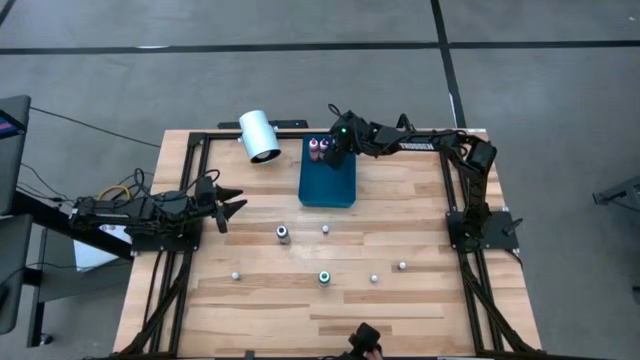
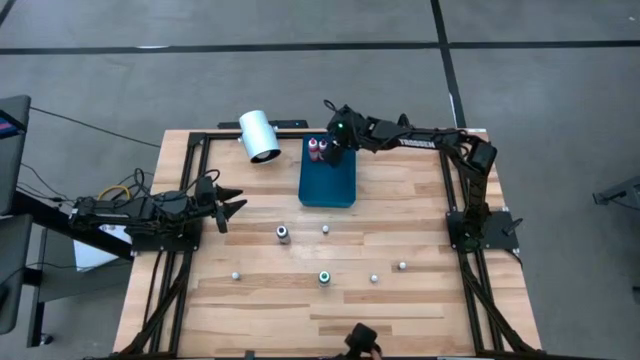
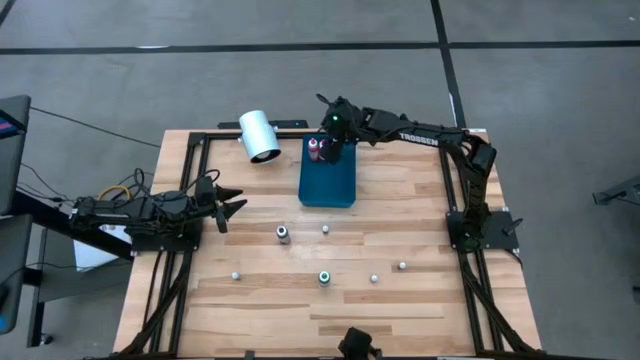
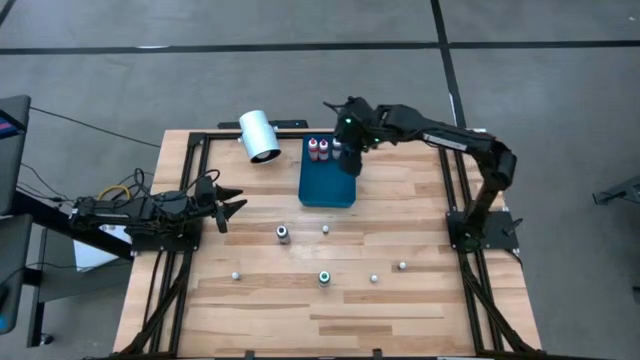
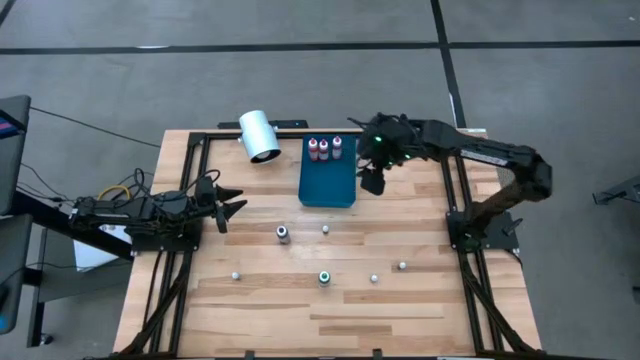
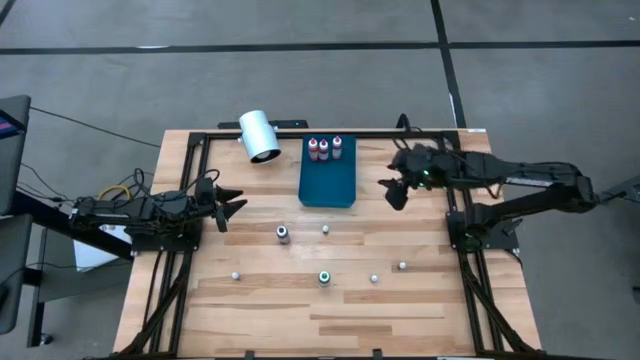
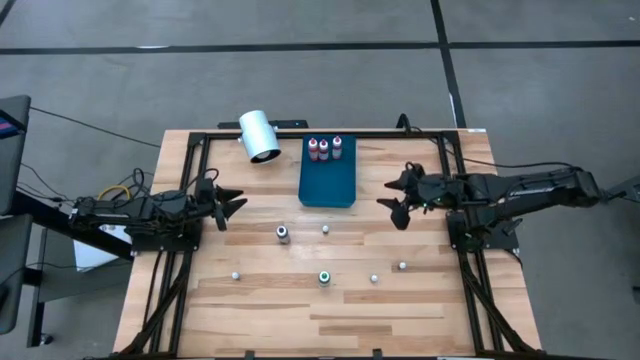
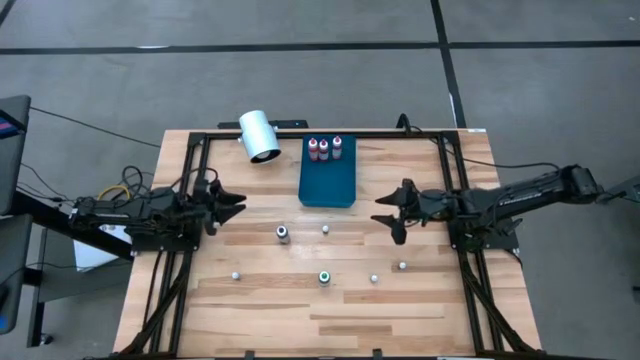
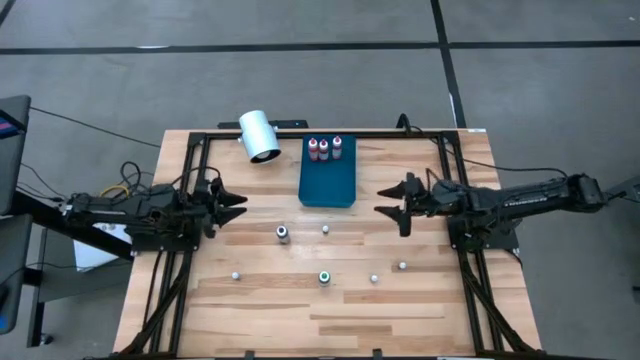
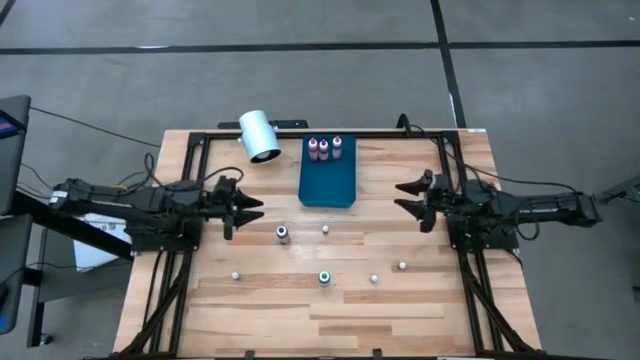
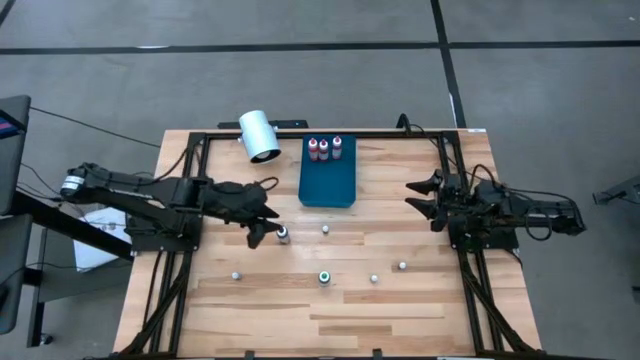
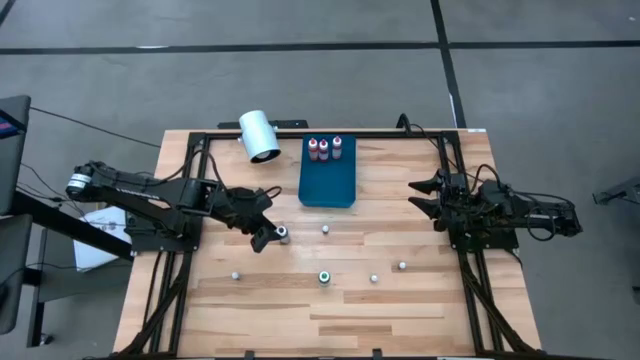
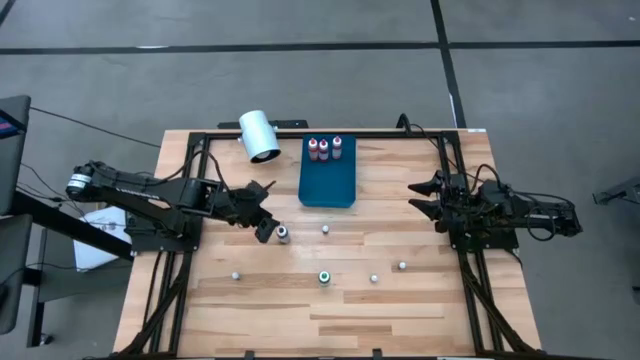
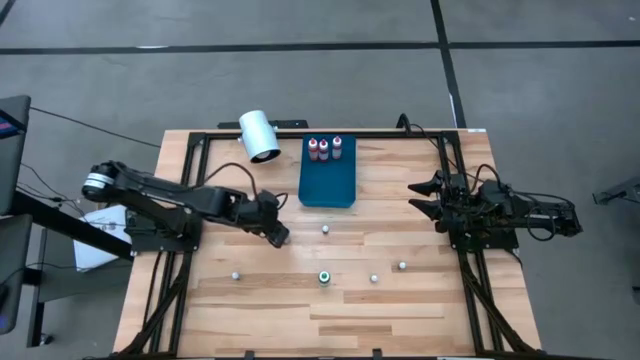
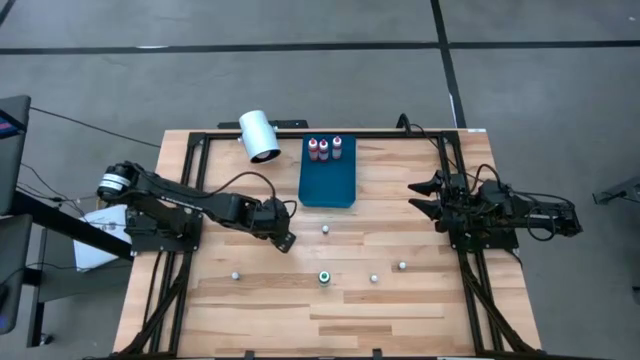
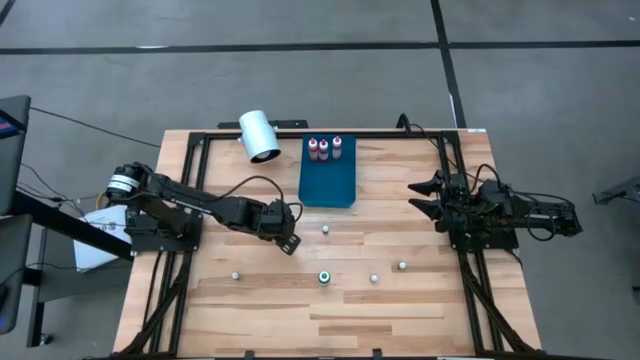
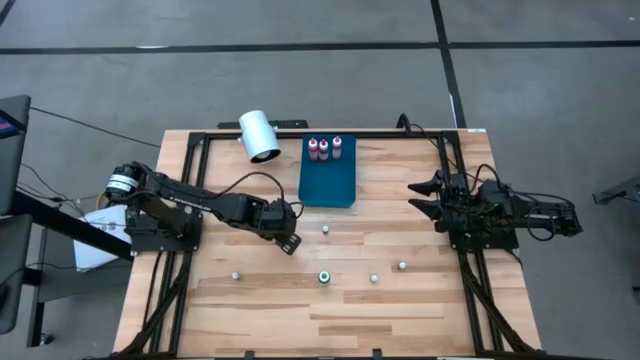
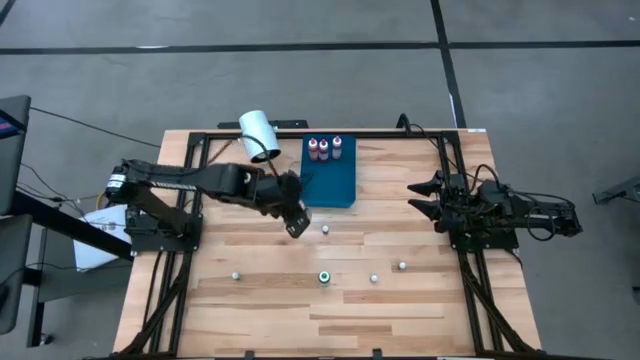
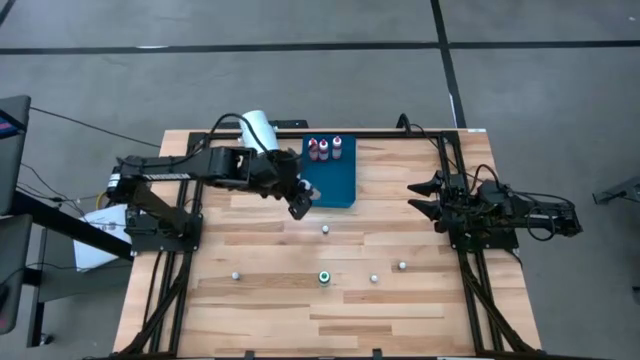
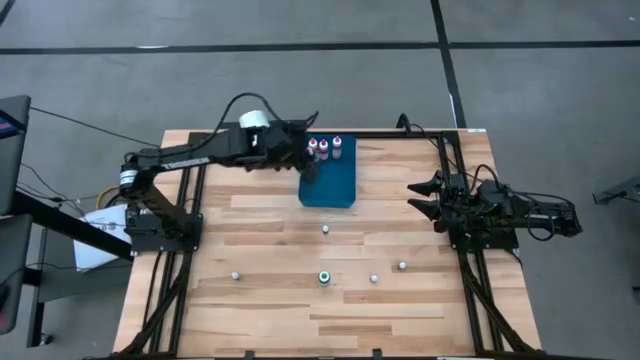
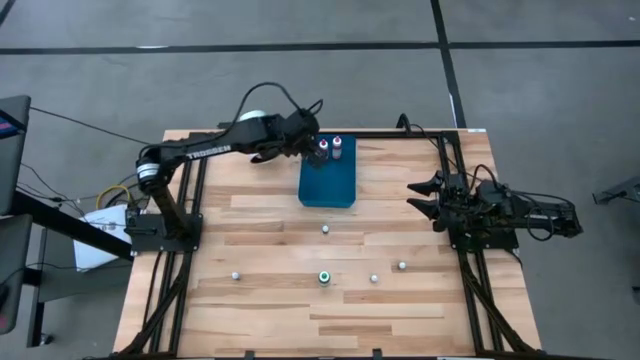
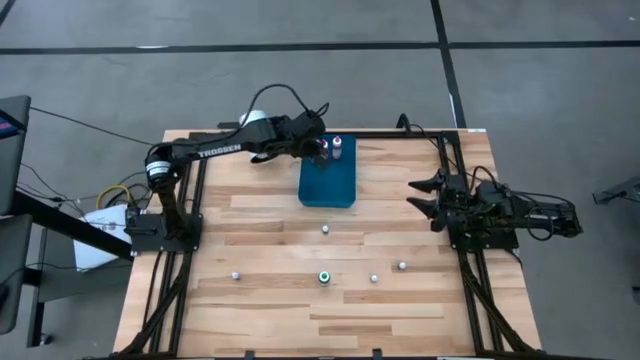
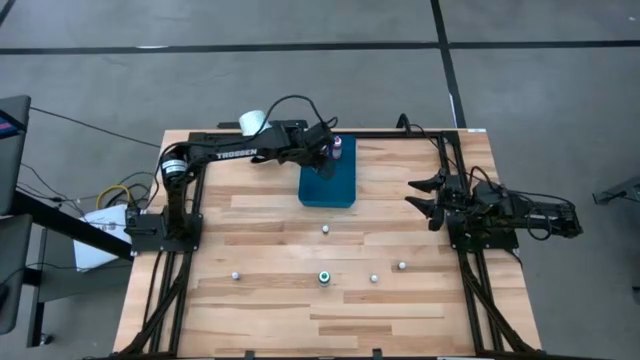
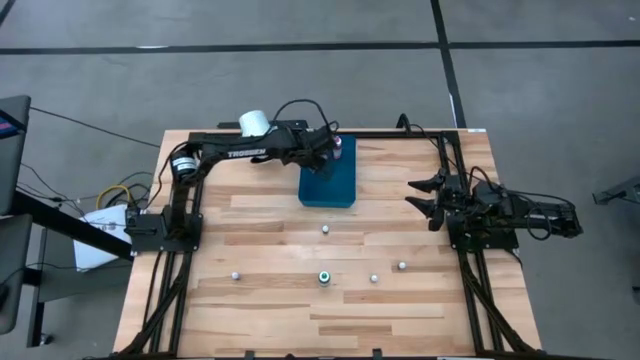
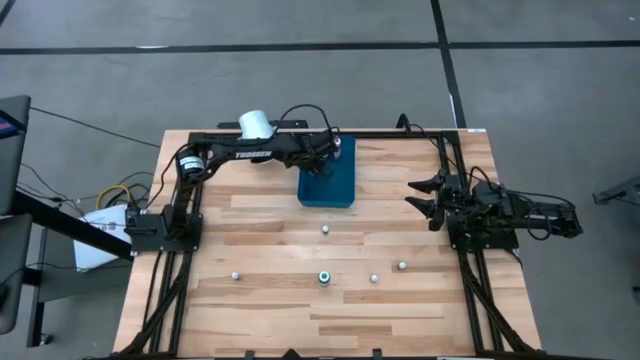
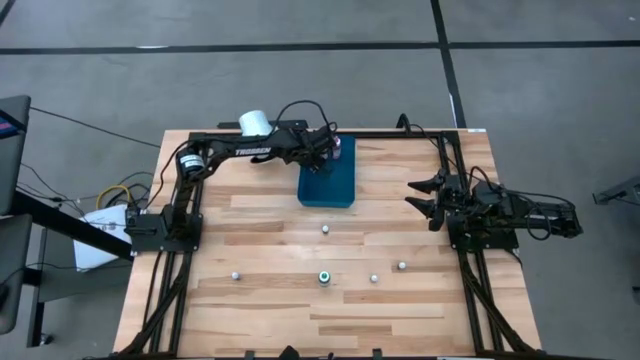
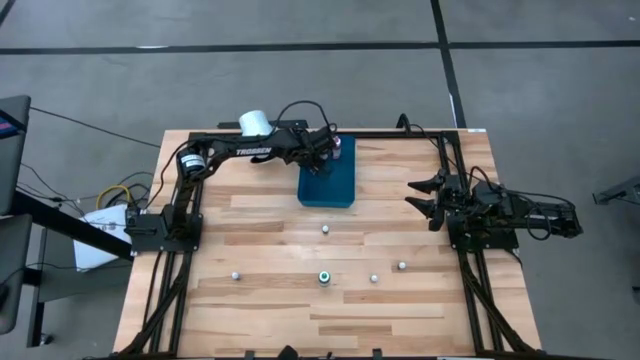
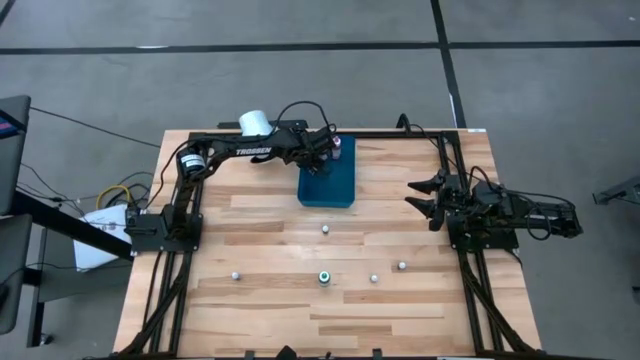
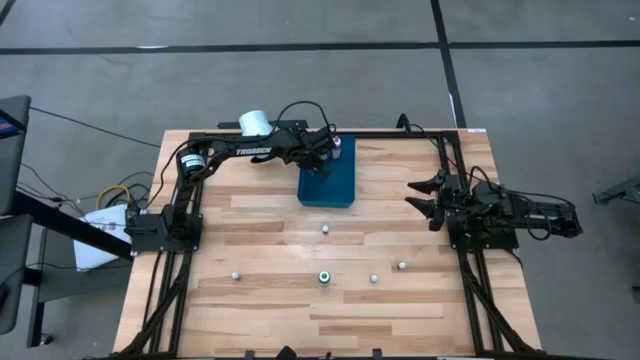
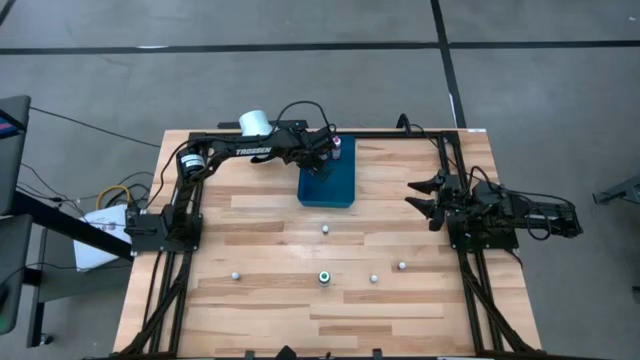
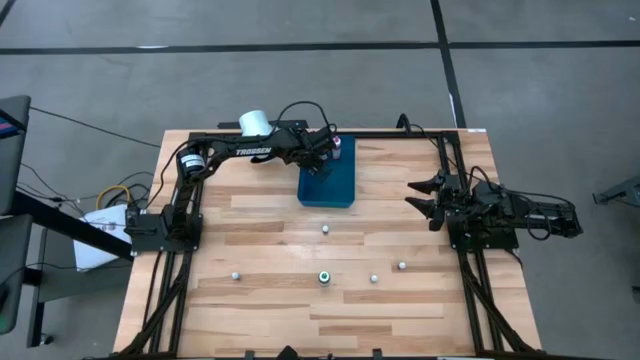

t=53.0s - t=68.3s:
Task: Pick & Place food coloring
Put the big black food coloring bottle into the blue bin

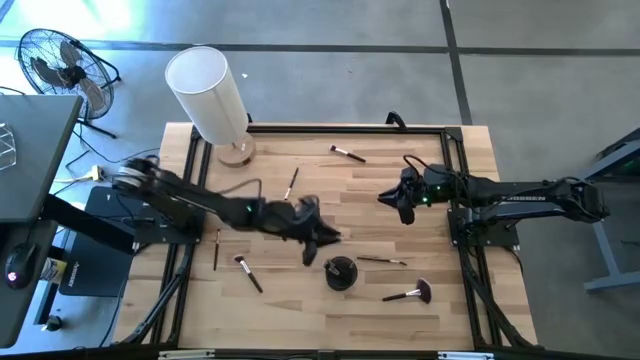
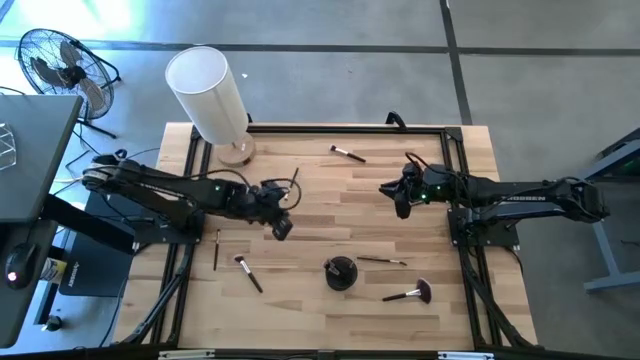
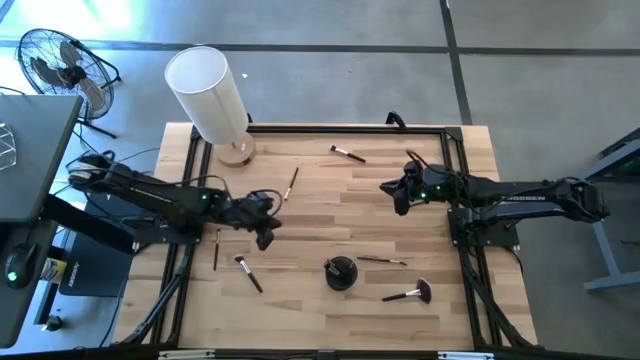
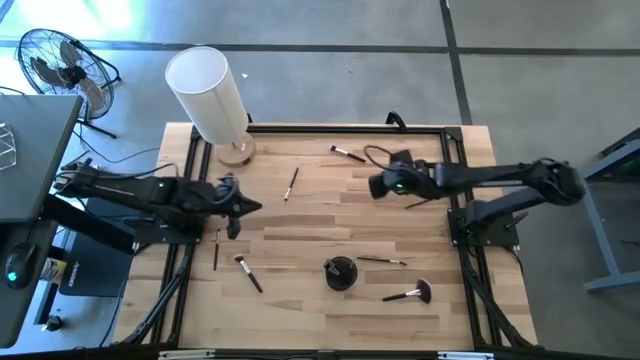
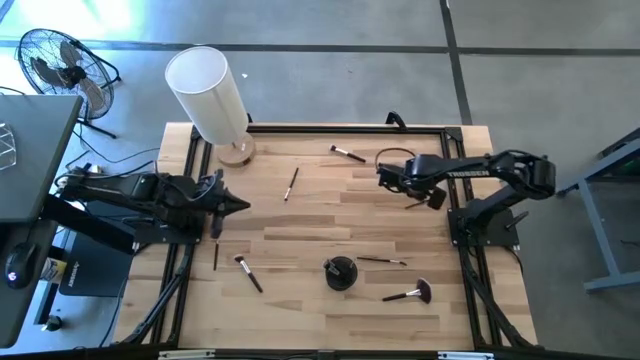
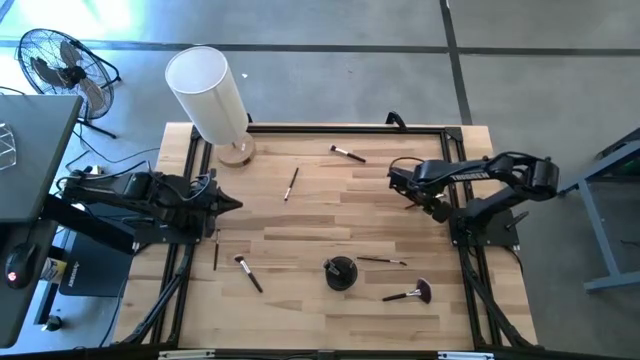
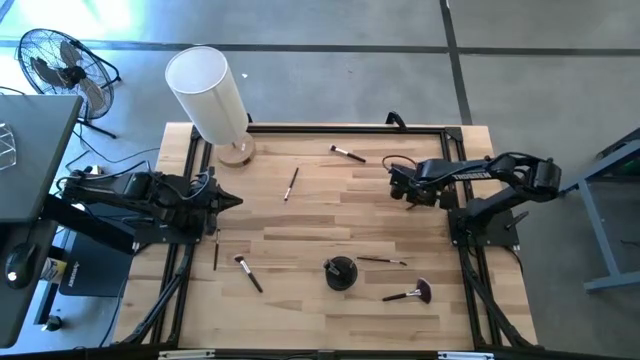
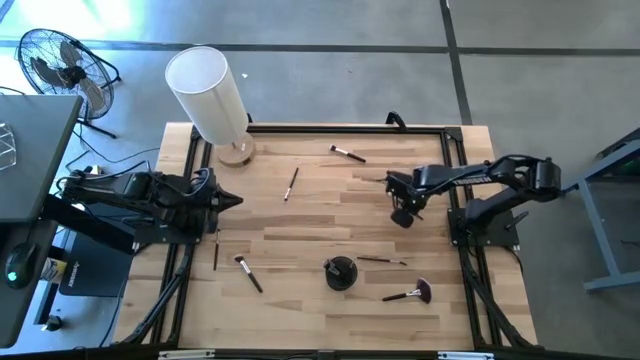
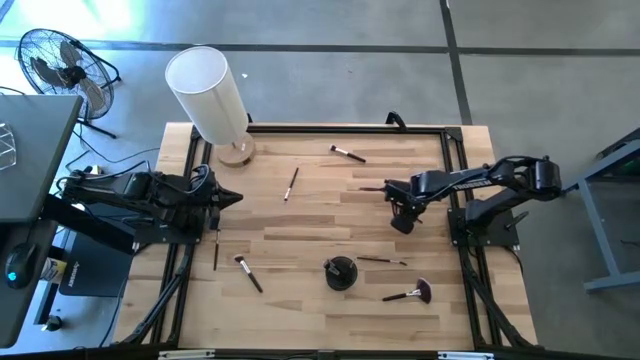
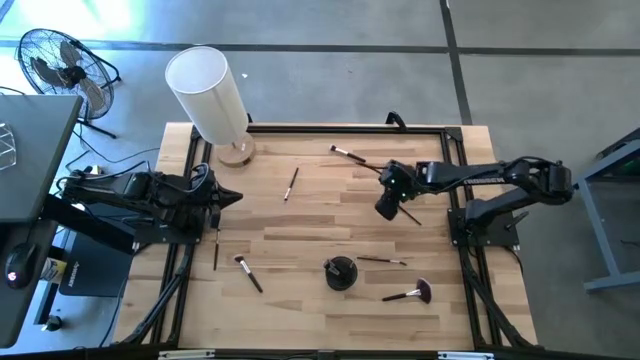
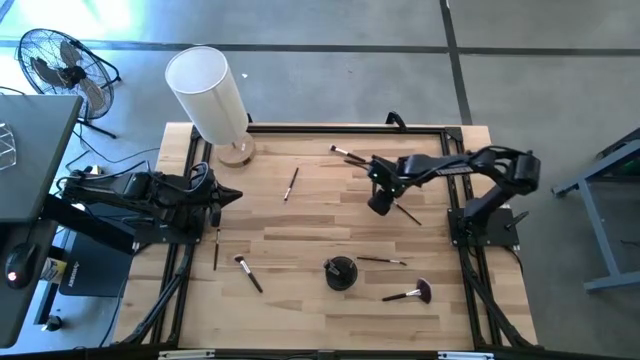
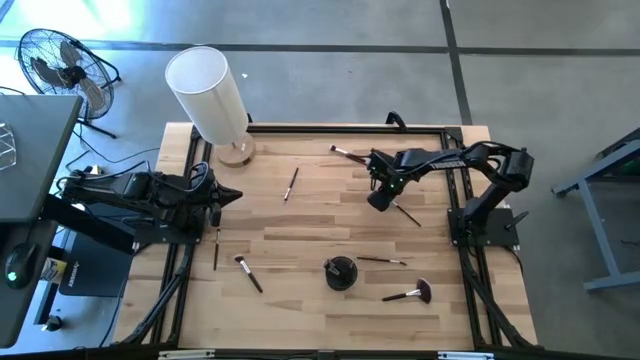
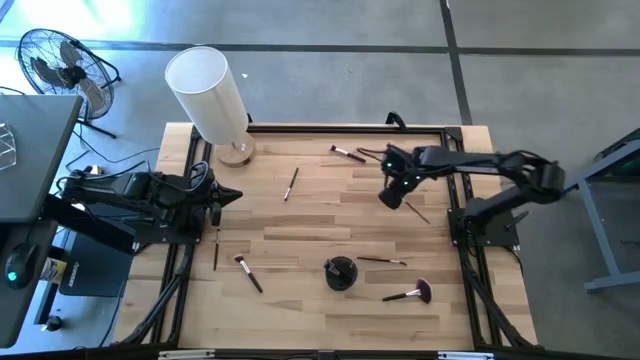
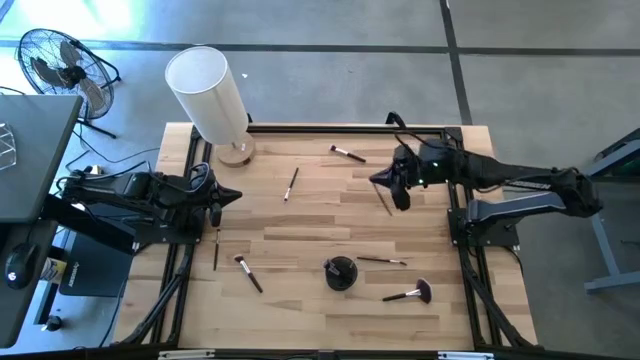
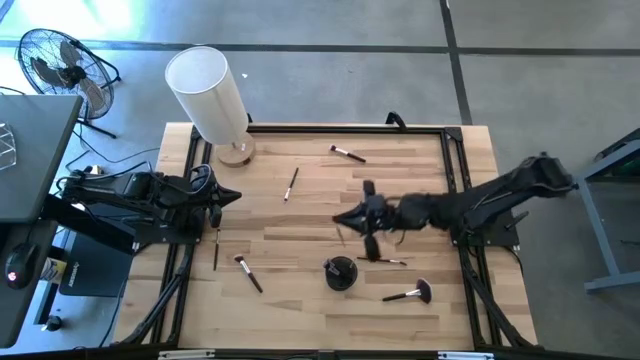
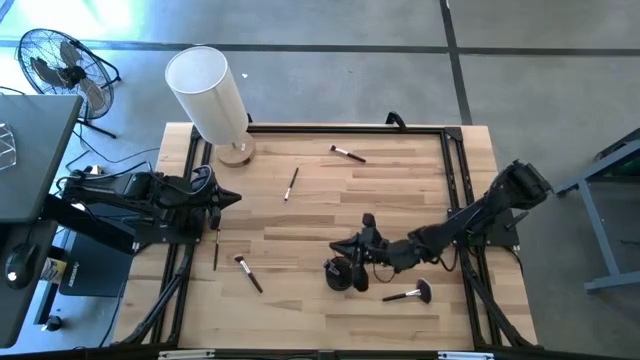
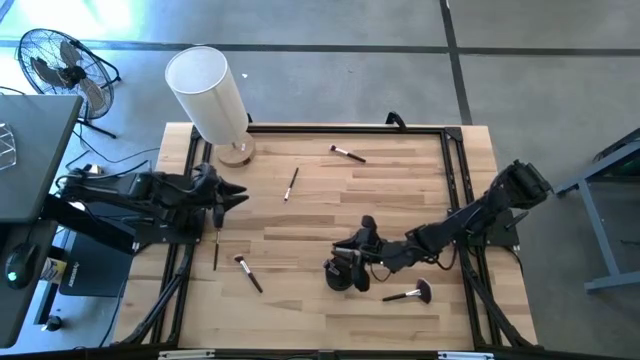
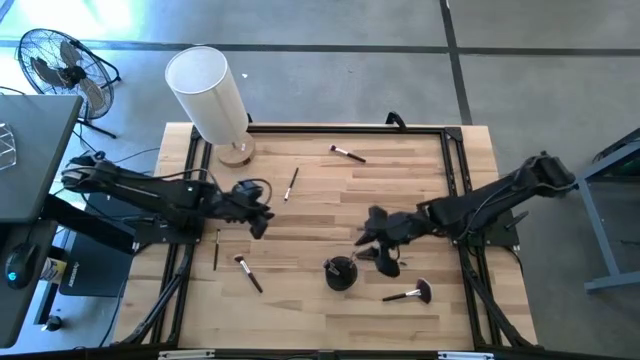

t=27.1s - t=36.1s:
Task: Pick & Place Makeup Supplies
Put the makeup brush into the black makeup holder
